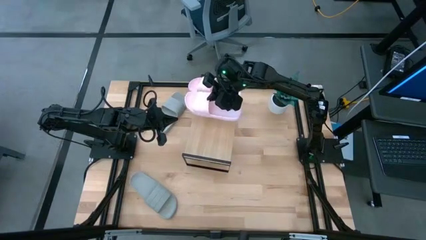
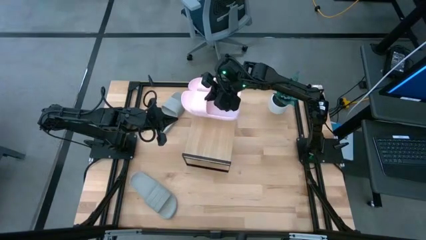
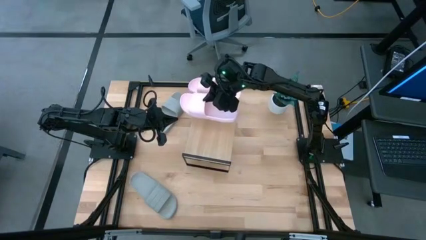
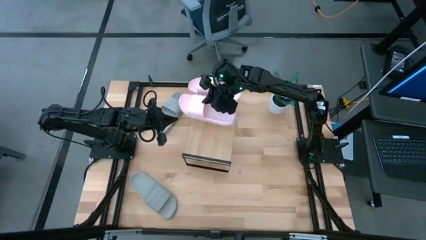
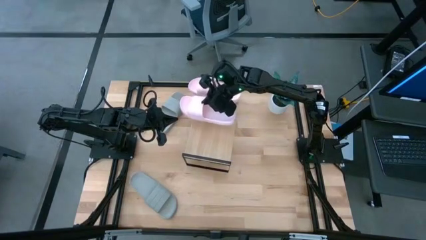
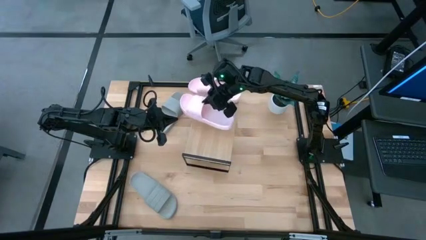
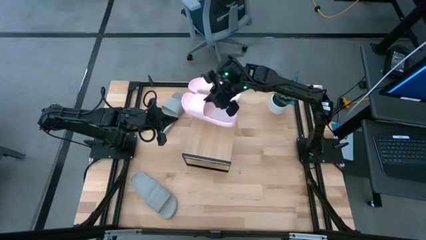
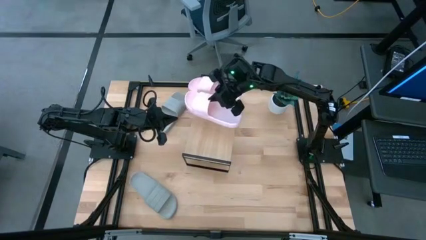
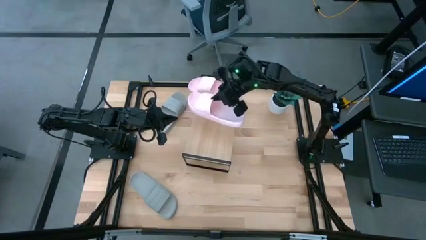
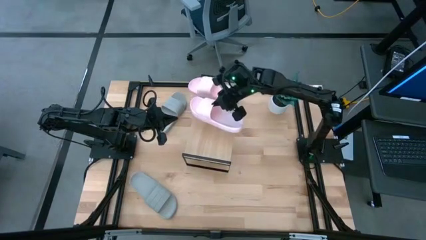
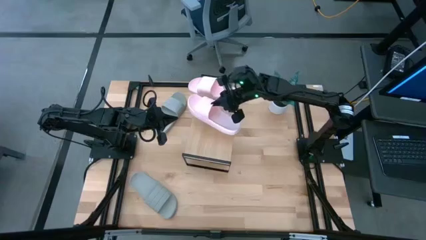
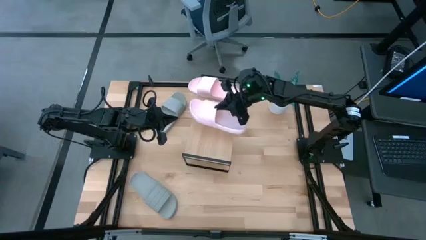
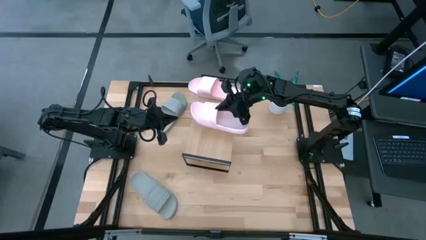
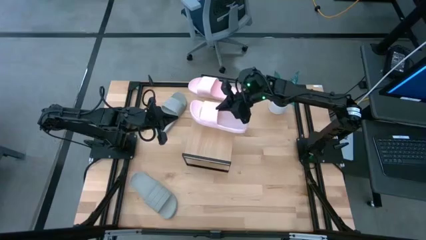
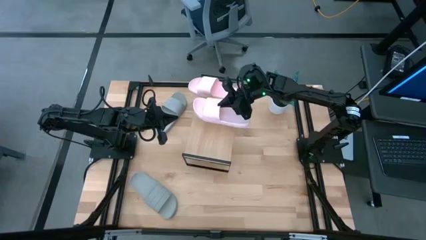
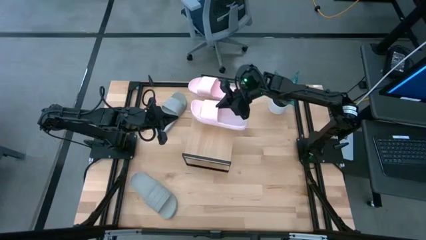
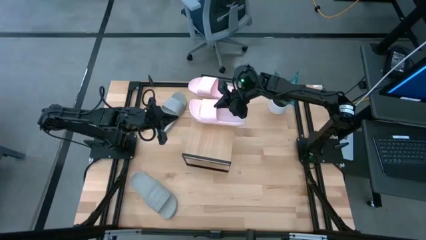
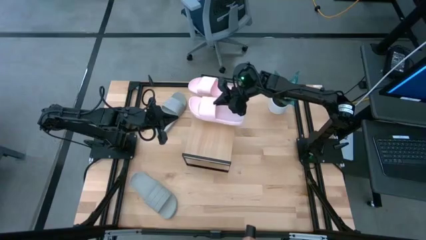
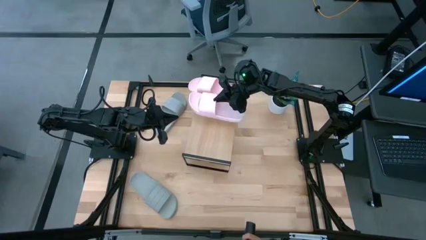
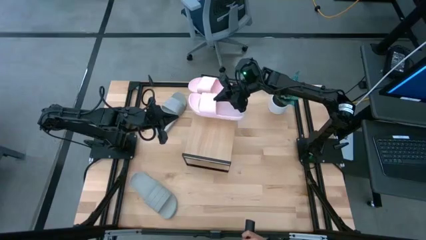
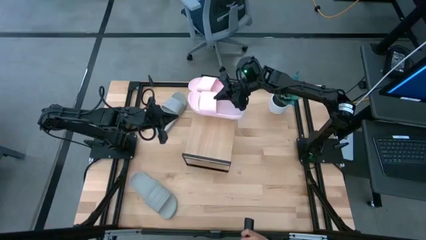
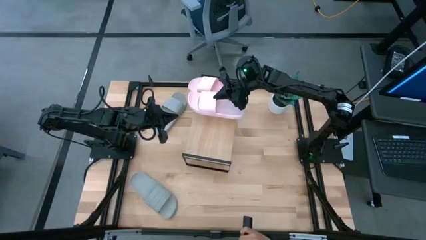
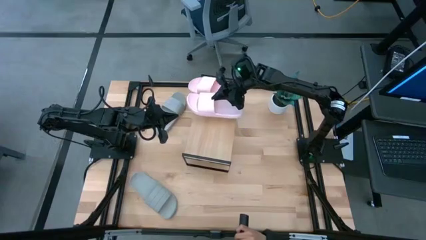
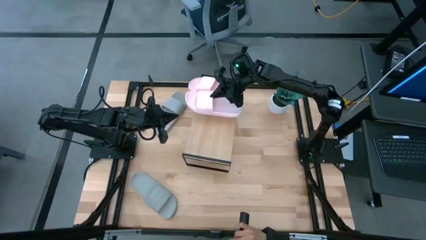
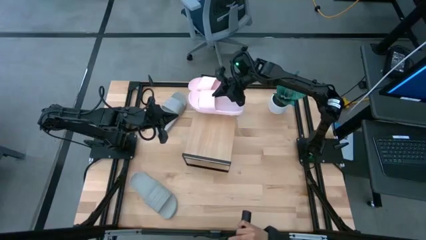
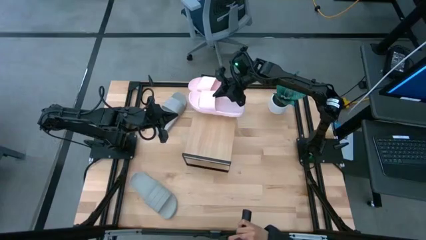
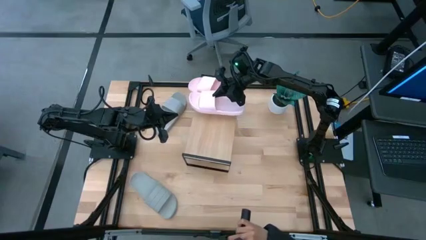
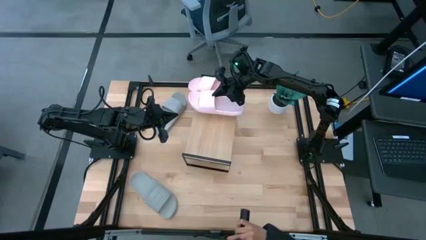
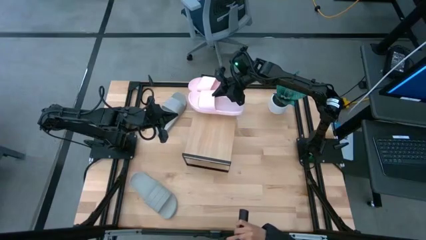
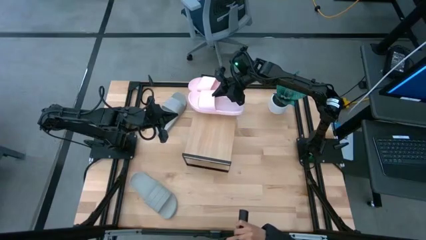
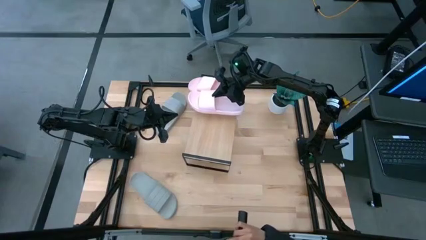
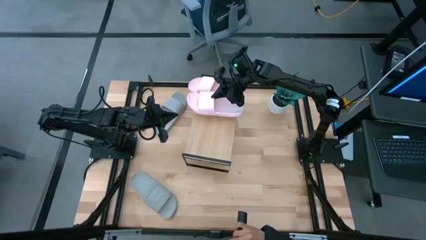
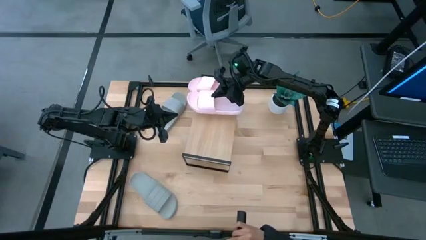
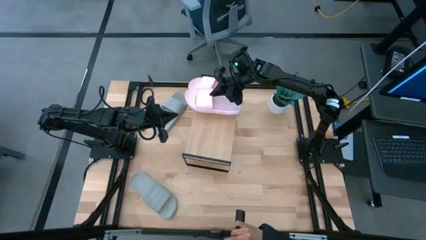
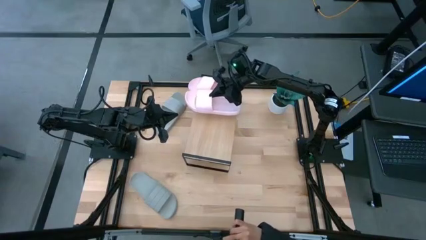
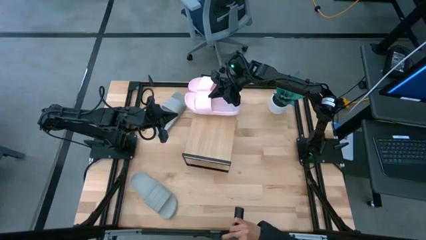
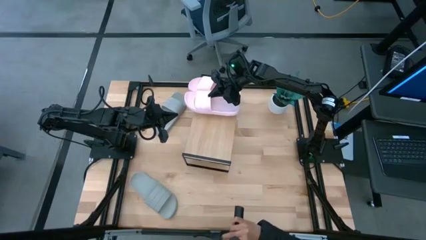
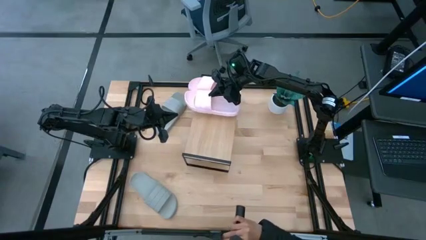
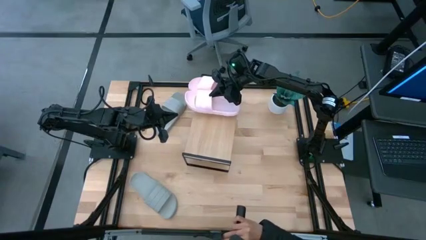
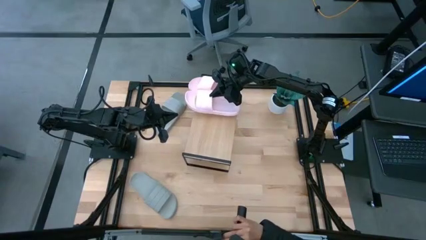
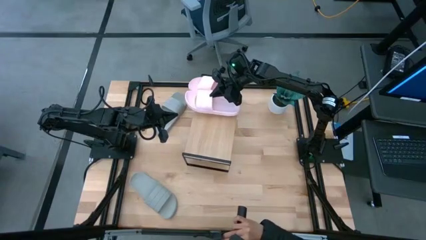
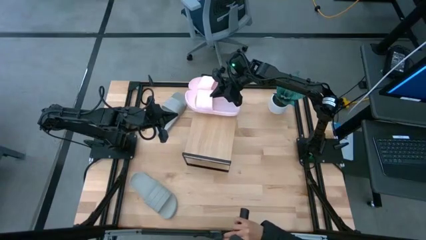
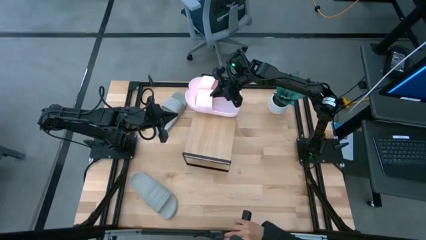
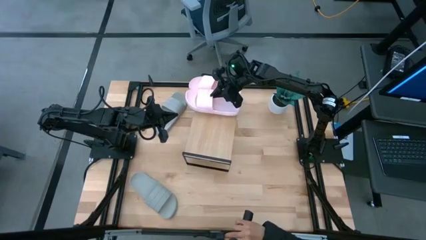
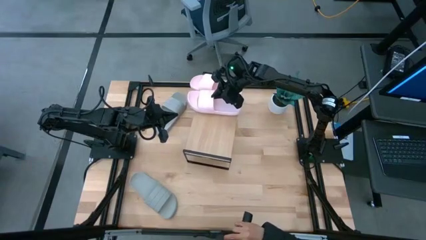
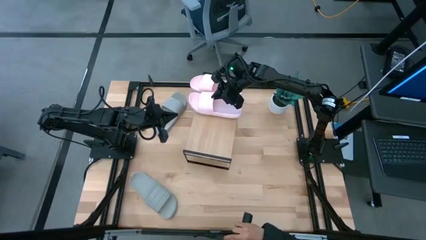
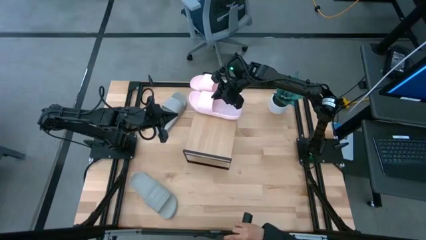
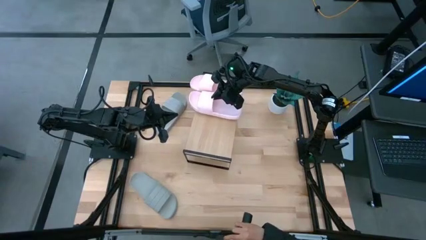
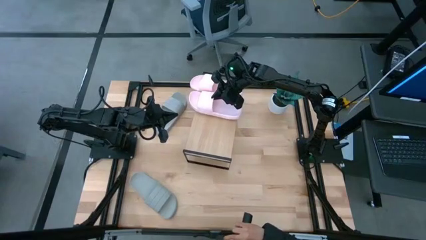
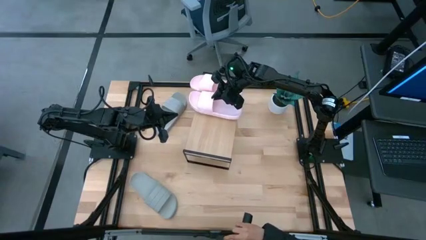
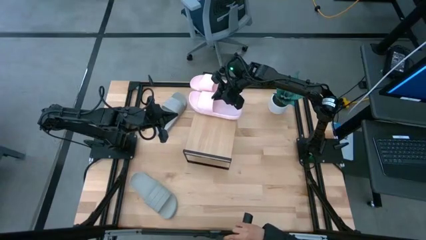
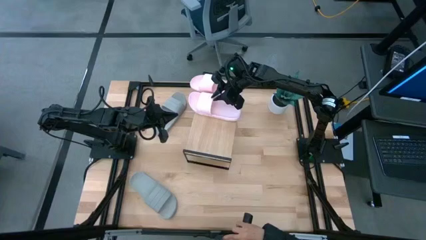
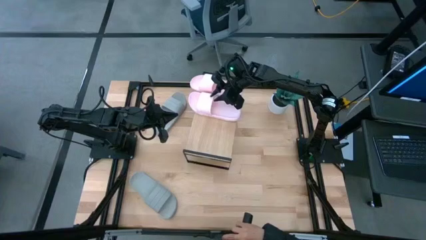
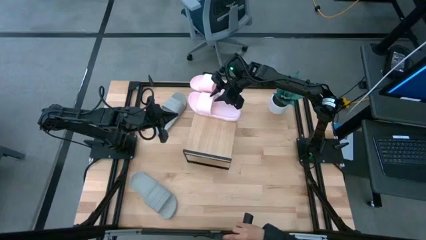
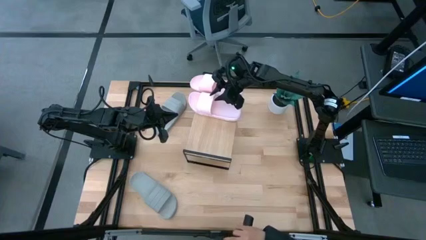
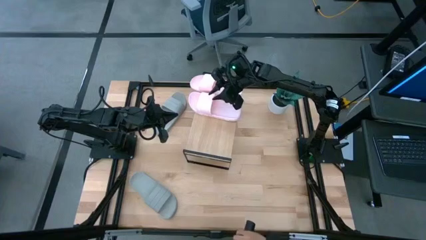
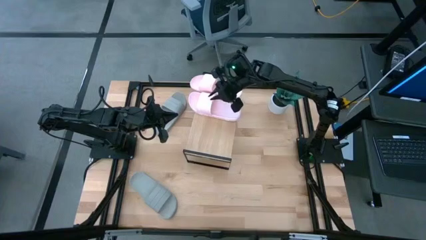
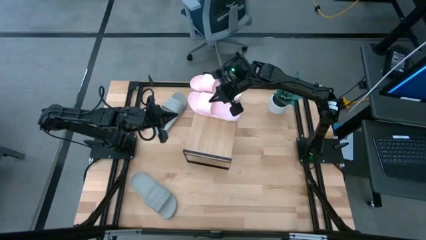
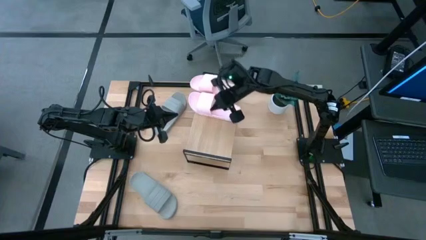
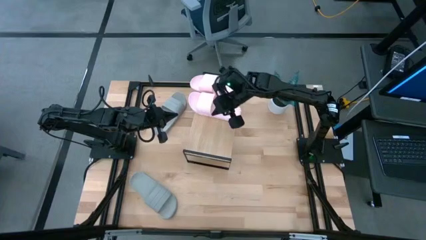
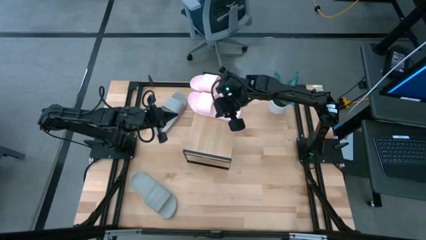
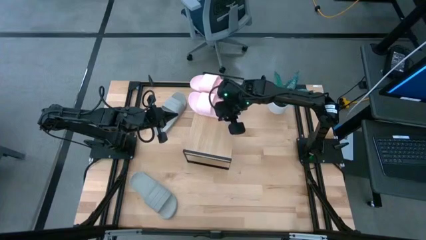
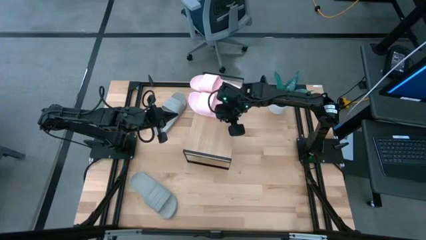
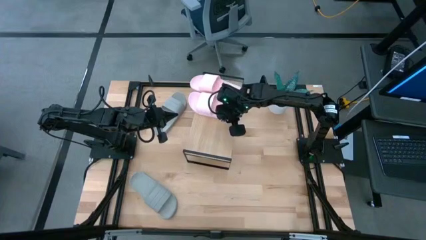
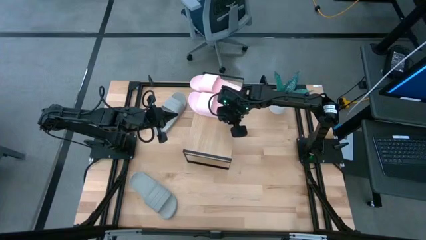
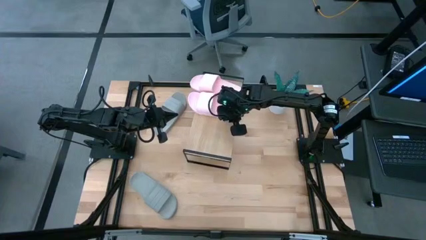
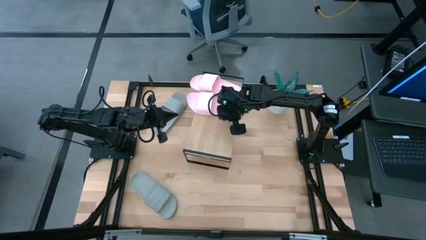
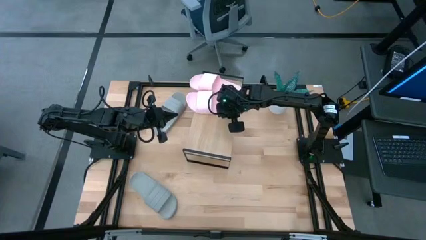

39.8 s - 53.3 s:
Task: Pick and place slides into the shelf
Put the pink slipper on the shelf
